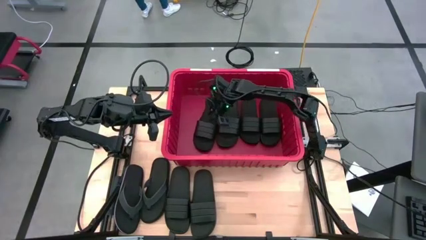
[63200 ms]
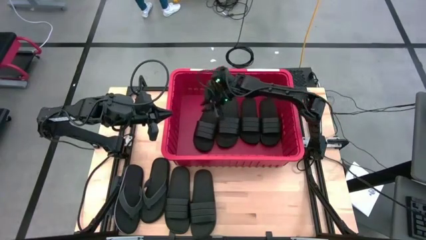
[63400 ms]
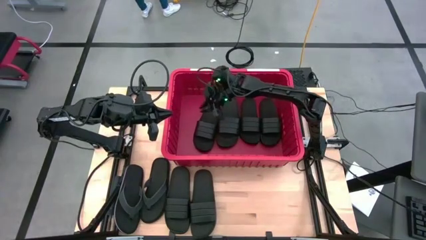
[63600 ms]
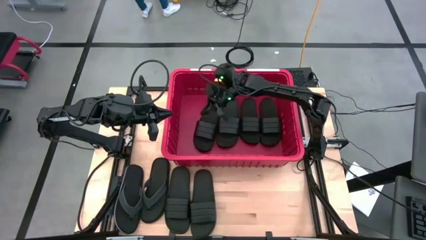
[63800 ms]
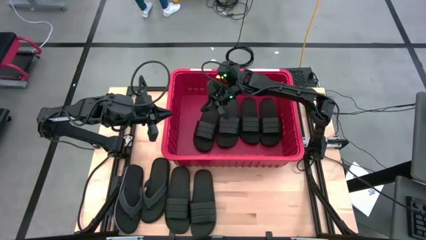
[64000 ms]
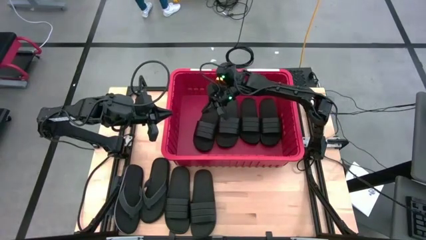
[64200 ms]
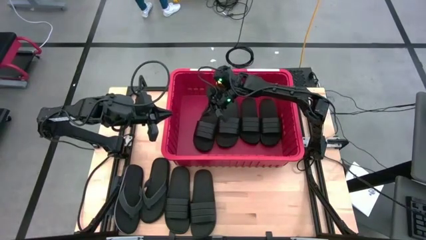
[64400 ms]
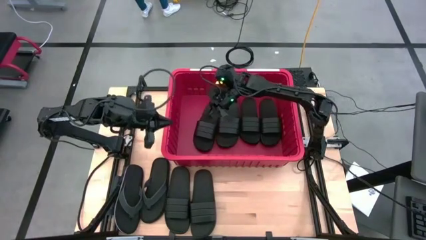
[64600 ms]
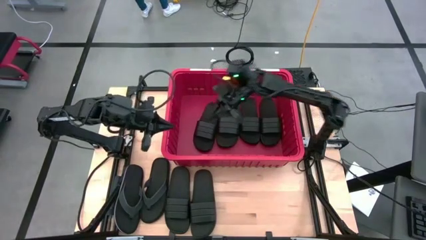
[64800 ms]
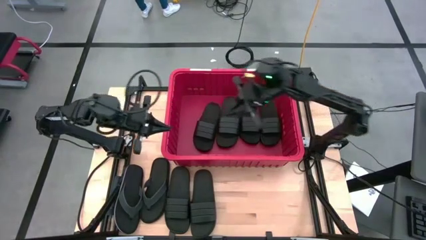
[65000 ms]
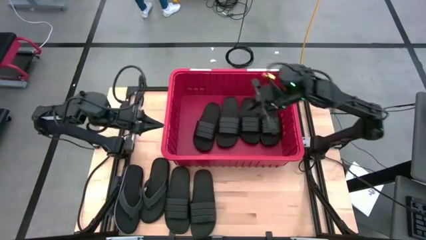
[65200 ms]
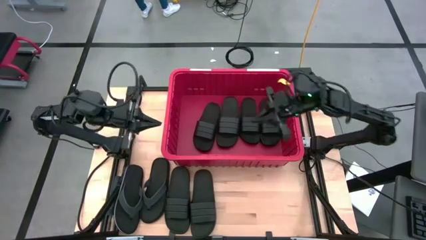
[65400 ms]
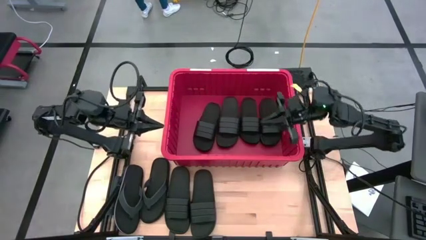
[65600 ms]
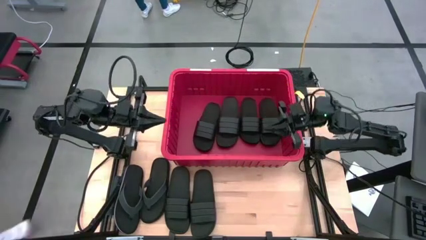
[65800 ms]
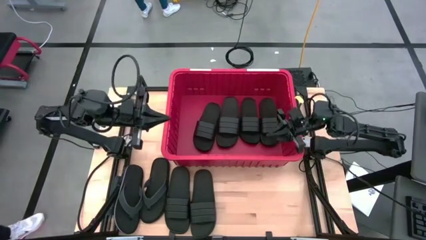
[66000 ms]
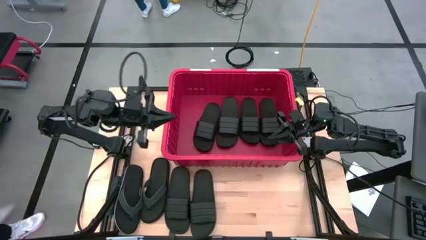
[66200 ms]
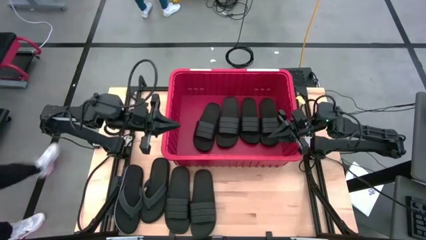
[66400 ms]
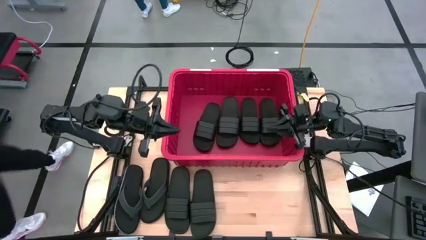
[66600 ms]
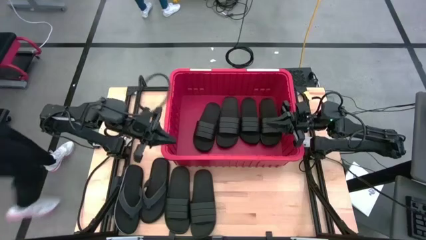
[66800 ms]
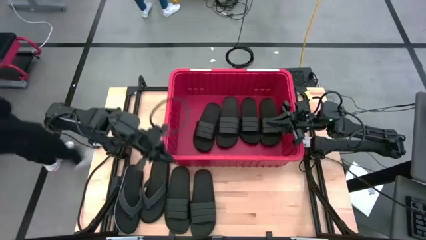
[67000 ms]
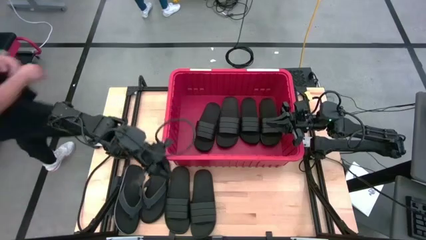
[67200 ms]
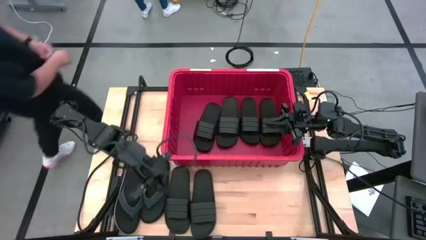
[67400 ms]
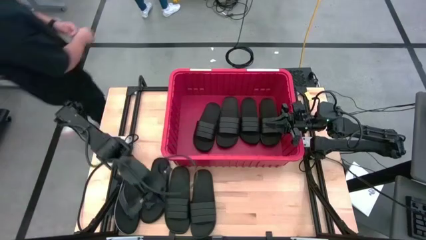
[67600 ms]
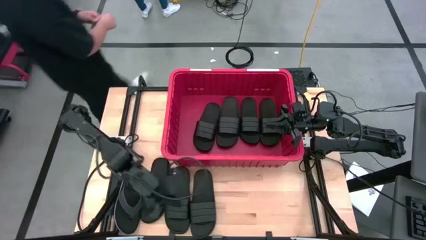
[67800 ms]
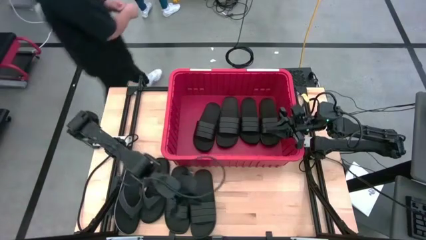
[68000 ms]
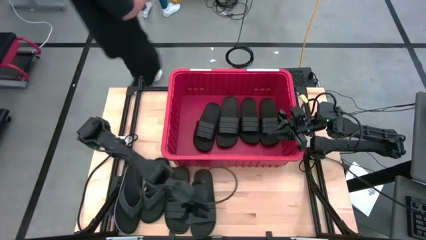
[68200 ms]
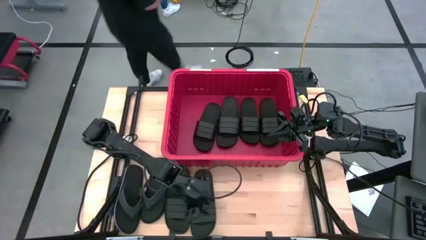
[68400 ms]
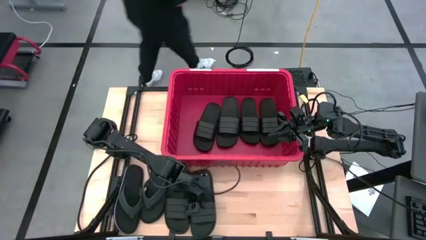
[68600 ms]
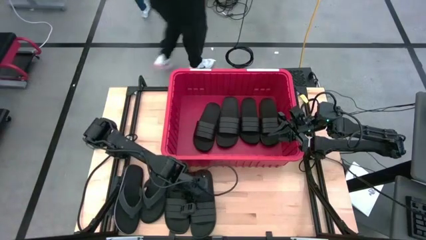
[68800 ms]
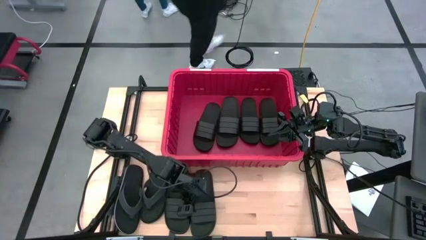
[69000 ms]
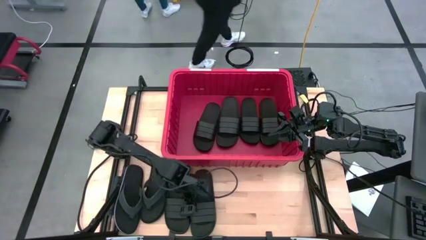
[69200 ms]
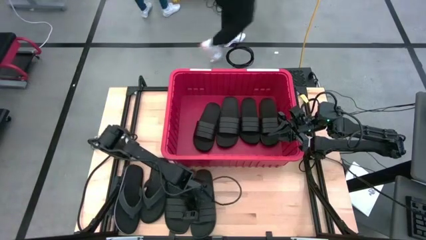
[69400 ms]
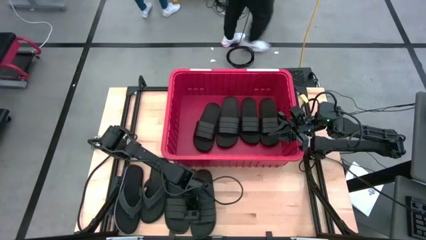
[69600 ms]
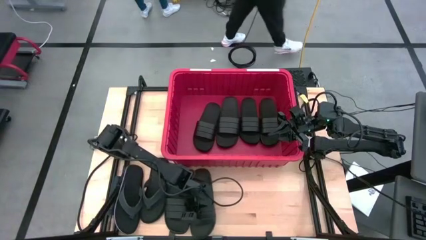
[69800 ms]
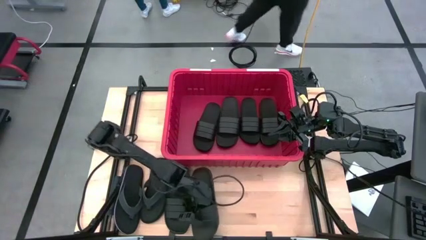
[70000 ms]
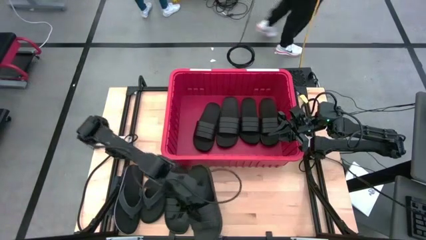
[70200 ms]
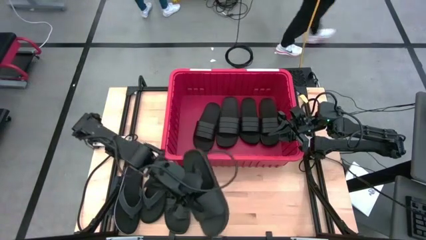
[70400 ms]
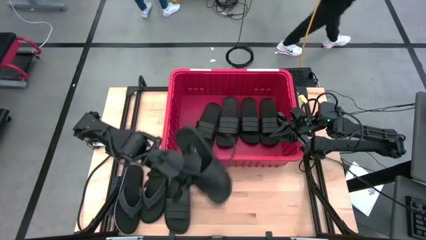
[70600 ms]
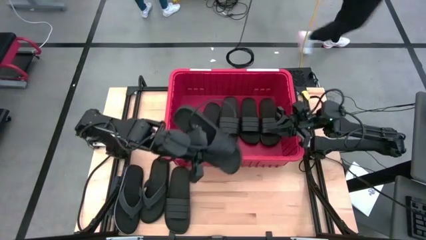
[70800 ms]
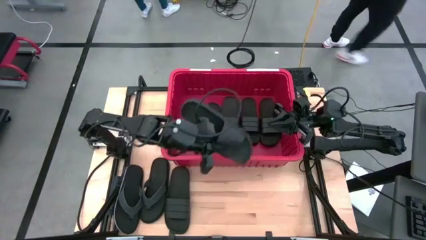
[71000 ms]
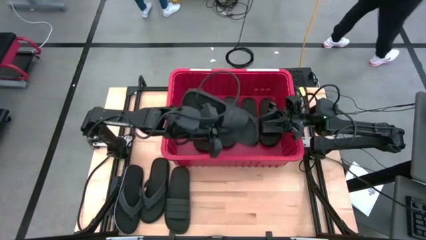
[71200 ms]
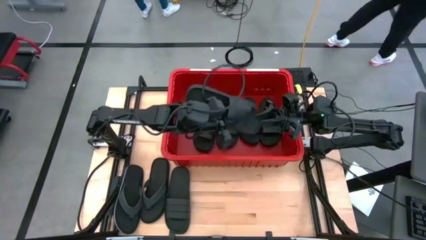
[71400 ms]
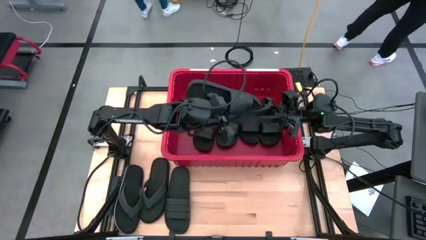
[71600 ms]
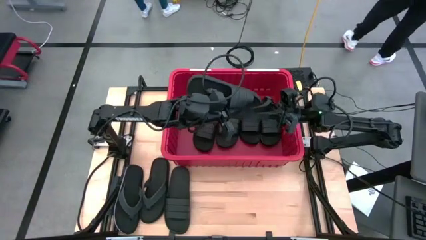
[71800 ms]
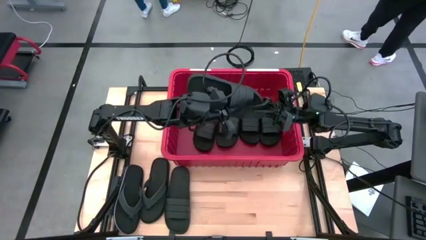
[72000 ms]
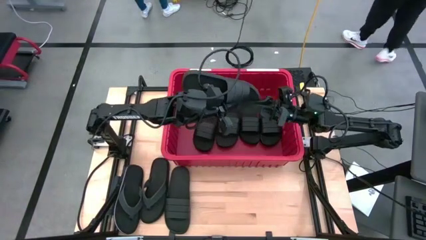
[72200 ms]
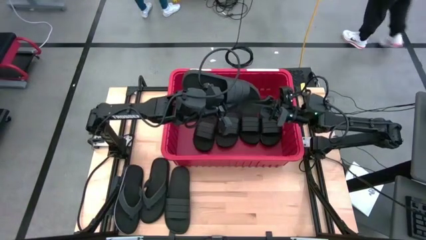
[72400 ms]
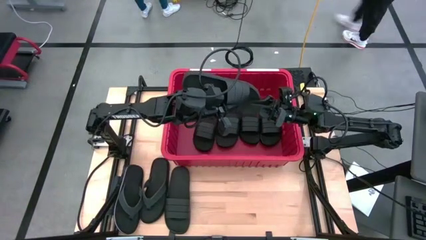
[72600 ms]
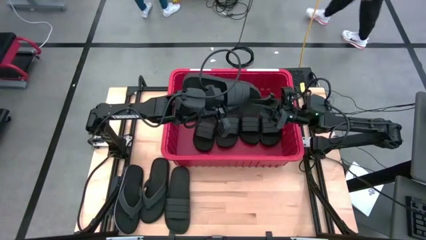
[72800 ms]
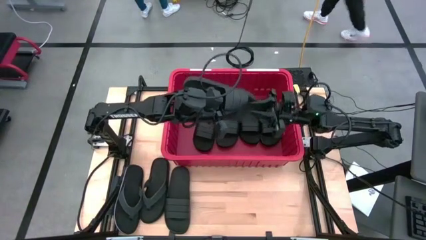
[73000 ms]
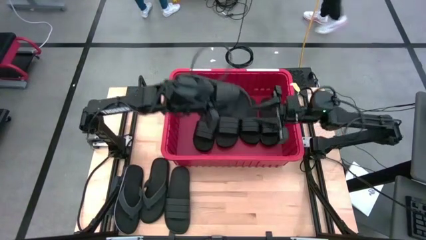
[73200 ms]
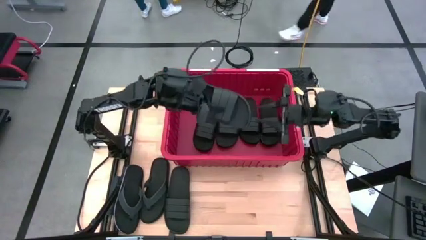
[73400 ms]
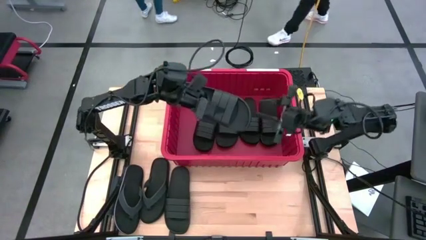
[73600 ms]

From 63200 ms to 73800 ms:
Task: Pick and place slides into bin
Put the black slide into the red container

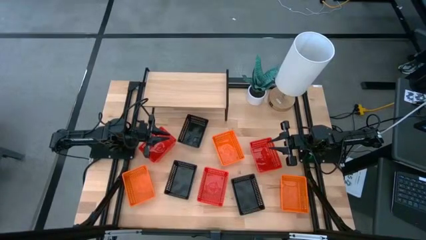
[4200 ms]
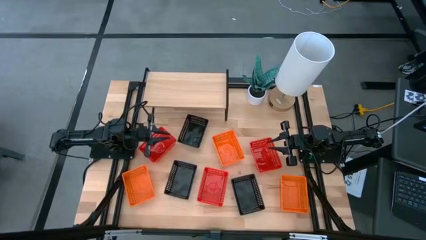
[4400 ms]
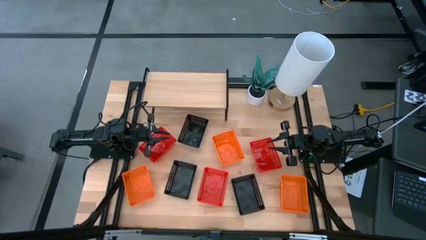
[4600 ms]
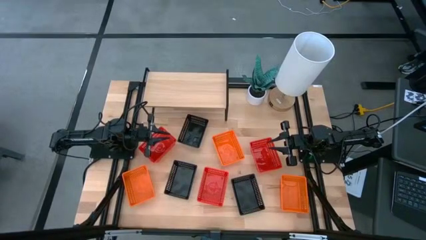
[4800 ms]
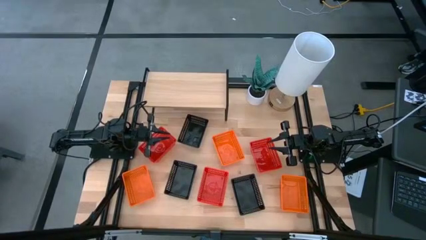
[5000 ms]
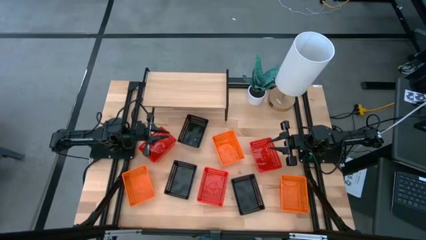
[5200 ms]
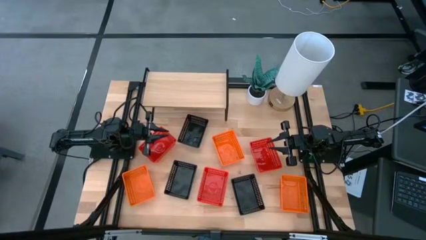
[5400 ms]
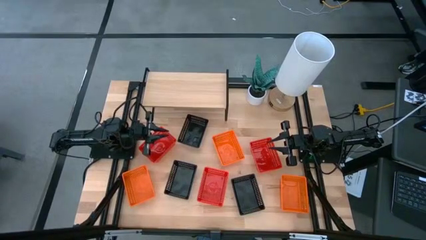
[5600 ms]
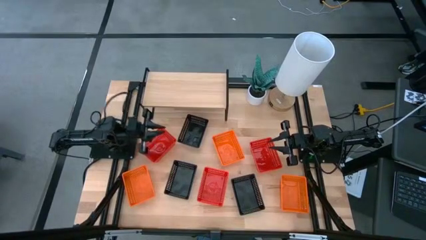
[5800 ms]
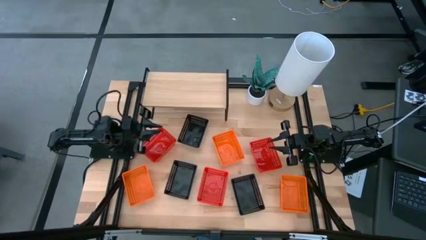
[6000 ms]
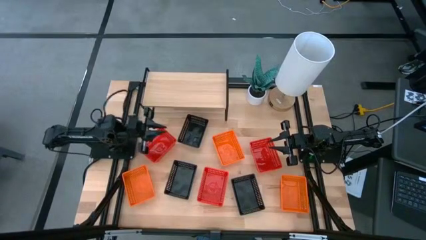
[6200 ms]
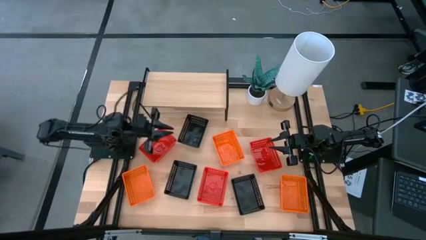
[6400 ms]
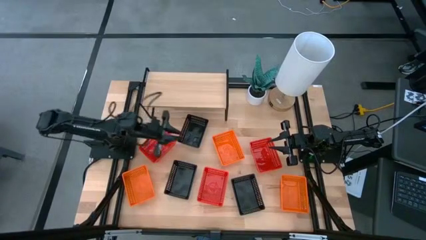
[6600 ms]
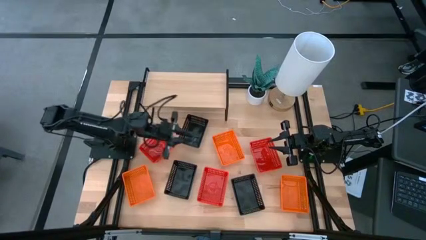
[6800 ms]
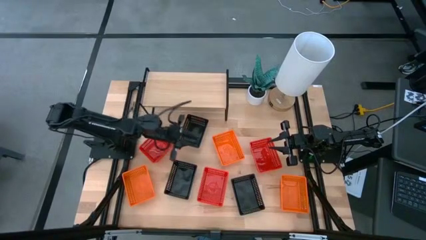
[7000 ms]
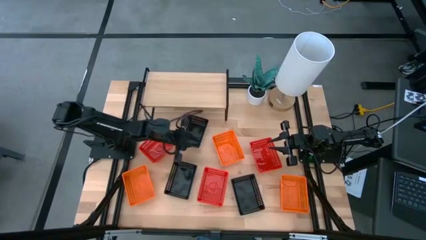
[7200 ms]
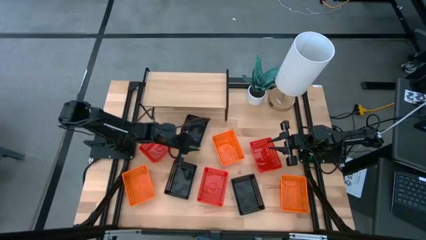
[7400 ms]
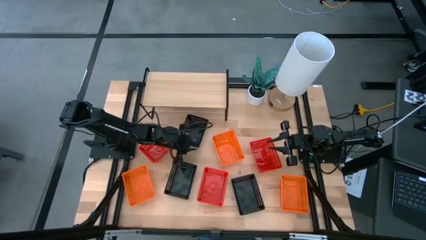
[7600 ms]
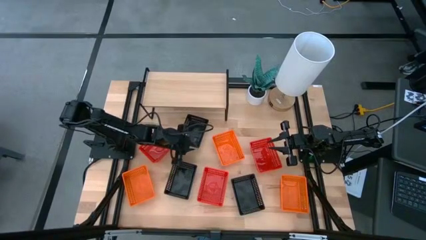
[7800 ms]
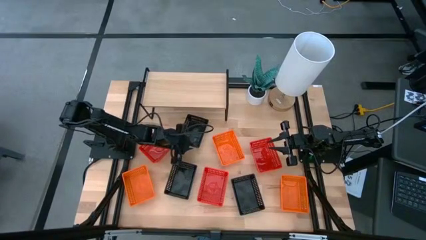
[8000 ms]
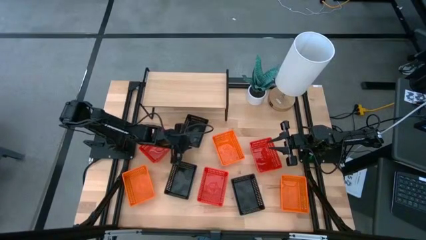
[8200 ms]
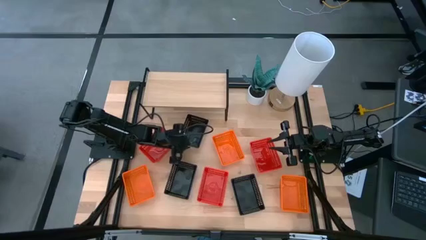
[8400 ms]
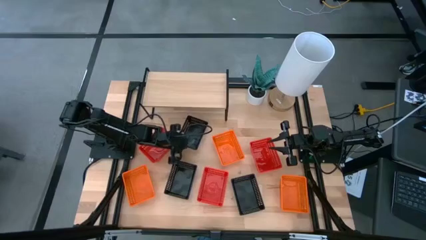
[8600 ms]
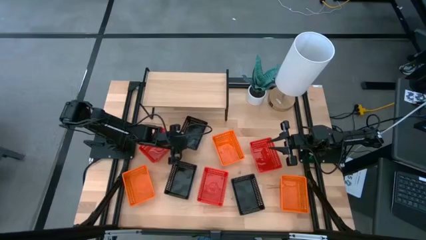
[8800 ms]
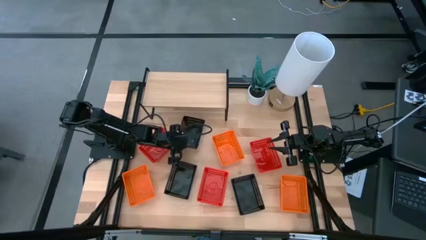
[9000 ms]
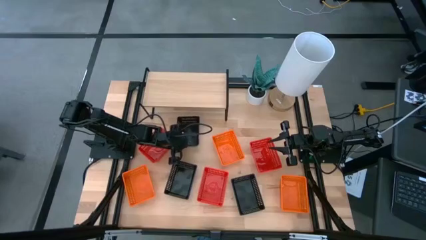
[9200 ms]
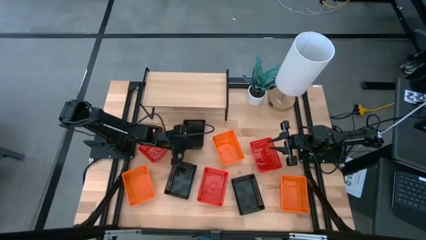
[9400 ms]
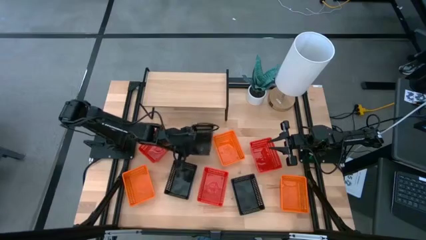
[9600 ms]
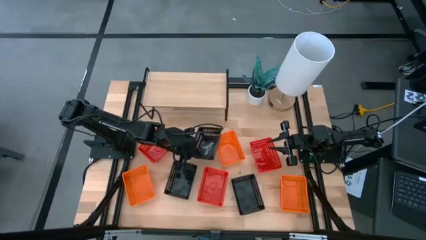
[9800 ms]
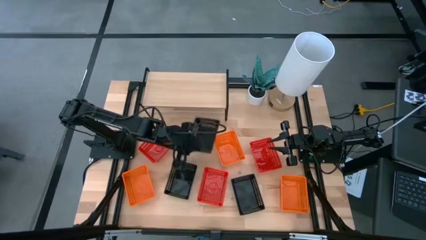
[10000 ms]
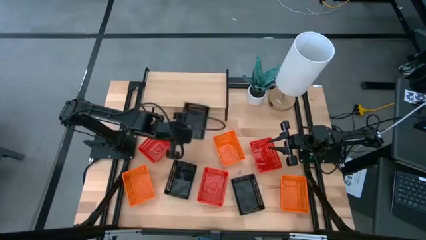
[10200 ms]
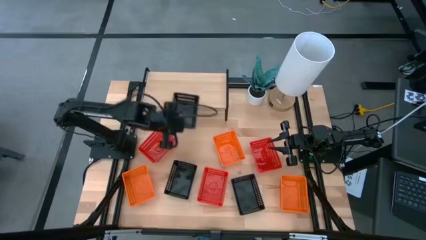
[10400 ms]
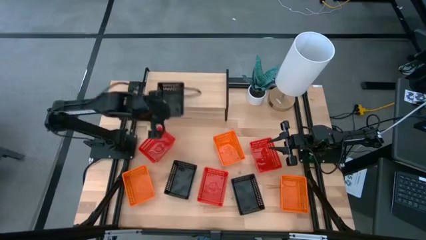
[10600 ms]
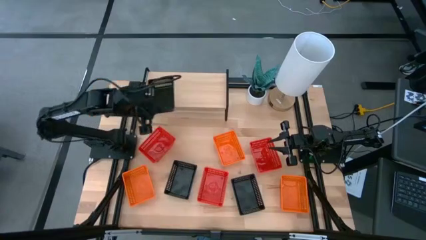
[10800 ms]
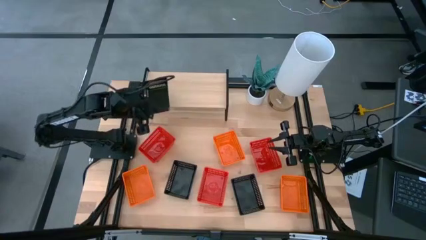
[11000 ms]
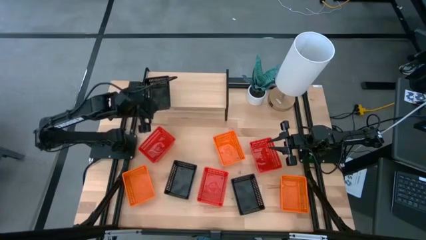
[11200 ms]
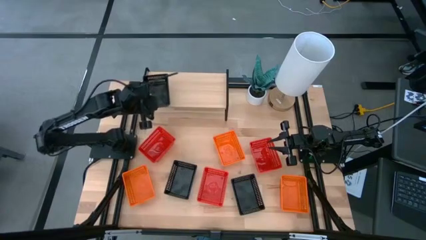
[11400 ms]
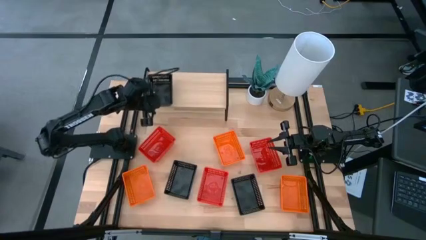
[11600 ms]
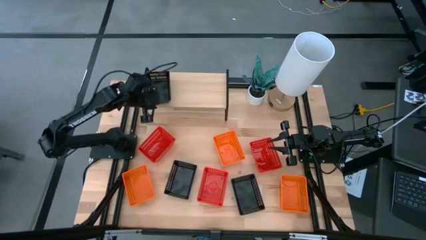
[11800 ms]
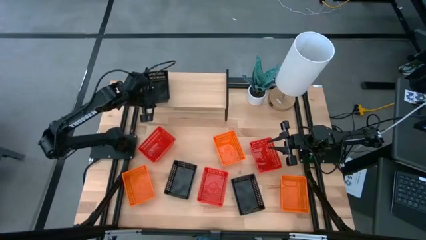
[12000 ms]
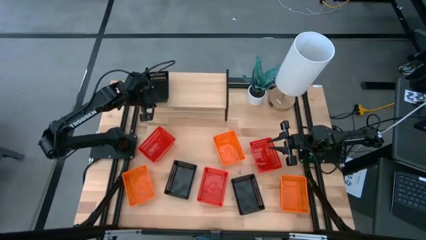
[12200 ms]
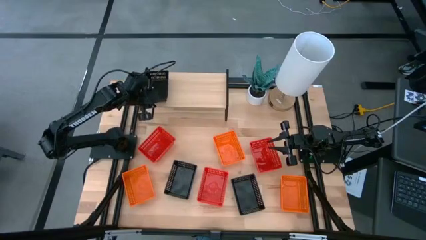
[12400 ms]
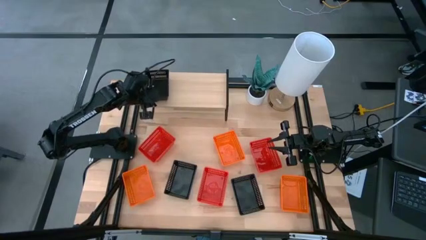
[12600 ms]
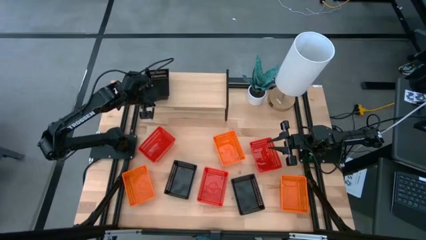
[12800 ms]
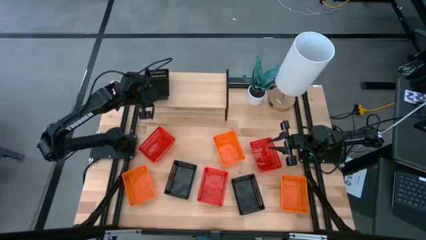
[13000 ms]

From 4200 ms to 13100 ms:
Task: Stack baskets on shelf by color
Put the top black bin on the shelf
